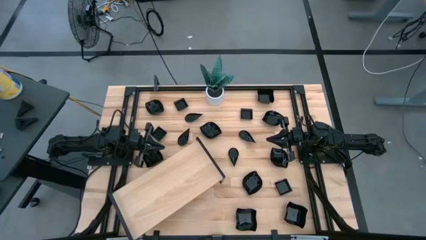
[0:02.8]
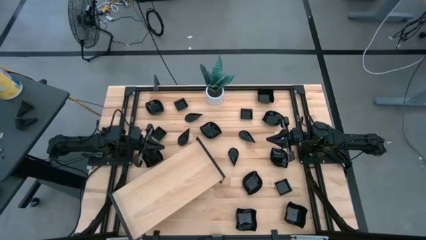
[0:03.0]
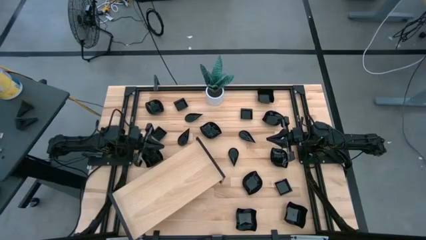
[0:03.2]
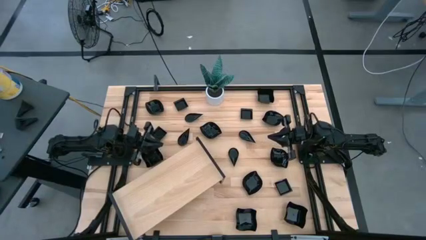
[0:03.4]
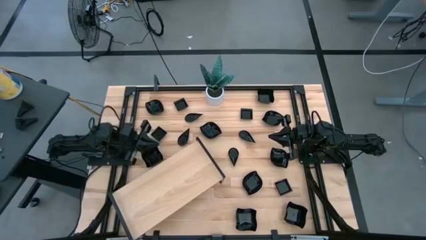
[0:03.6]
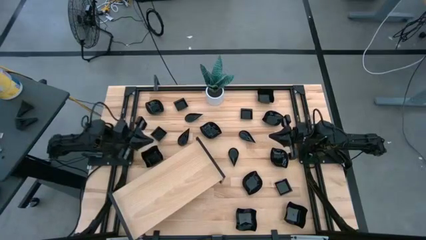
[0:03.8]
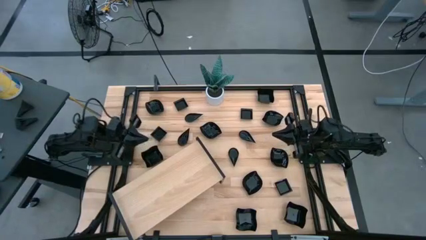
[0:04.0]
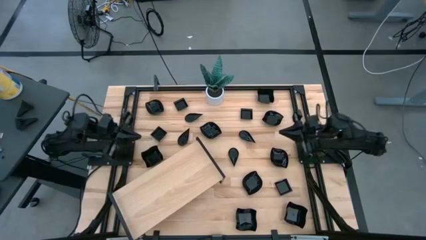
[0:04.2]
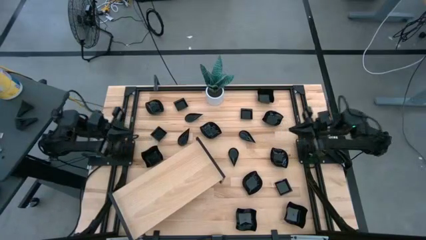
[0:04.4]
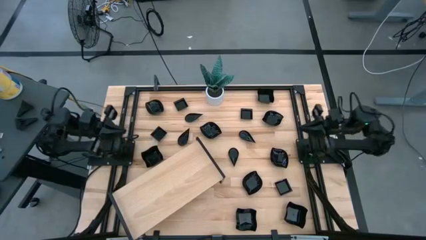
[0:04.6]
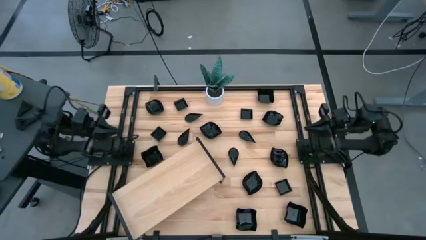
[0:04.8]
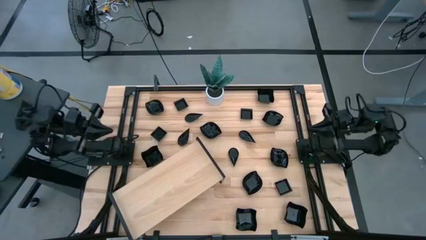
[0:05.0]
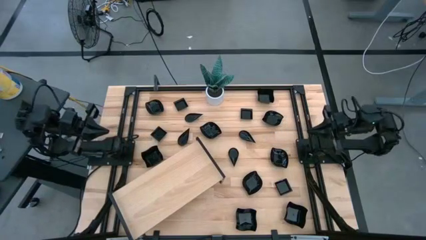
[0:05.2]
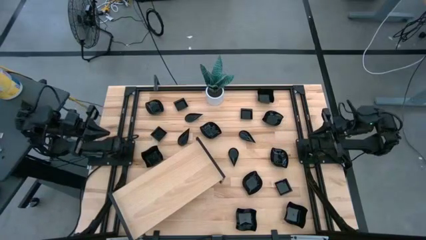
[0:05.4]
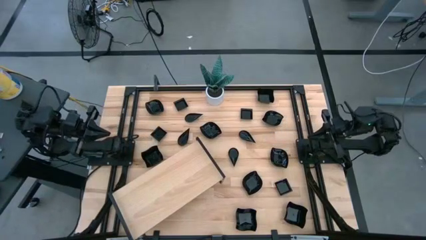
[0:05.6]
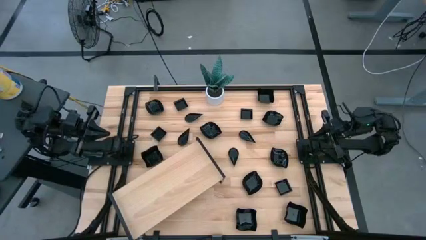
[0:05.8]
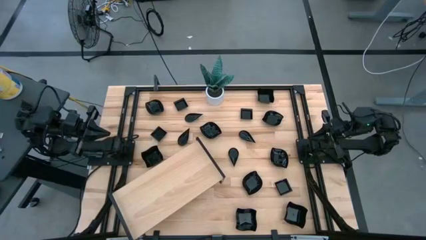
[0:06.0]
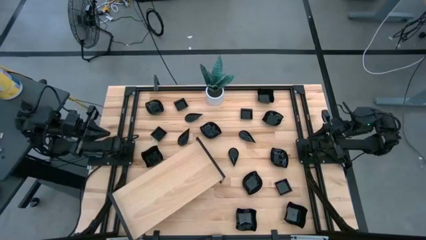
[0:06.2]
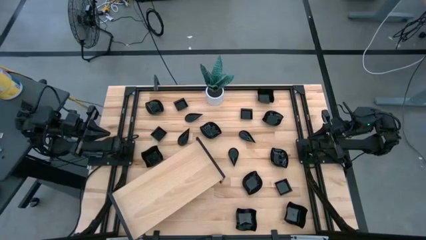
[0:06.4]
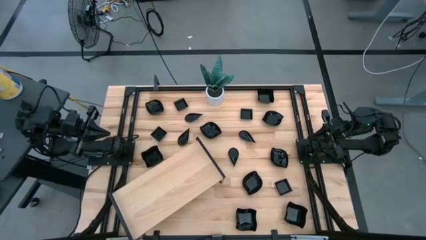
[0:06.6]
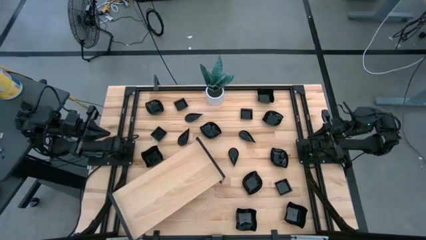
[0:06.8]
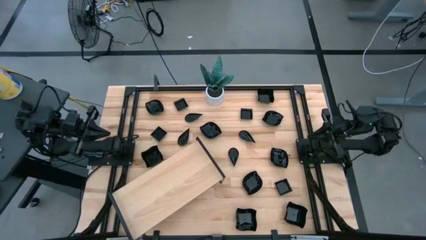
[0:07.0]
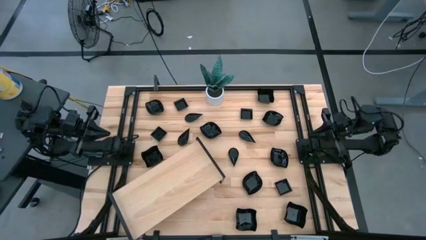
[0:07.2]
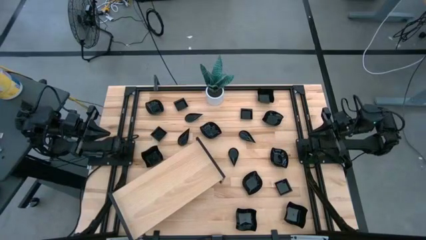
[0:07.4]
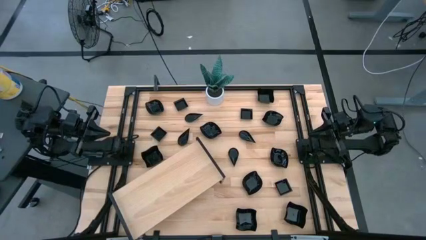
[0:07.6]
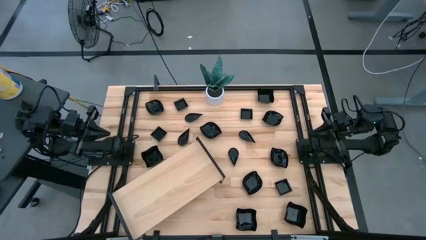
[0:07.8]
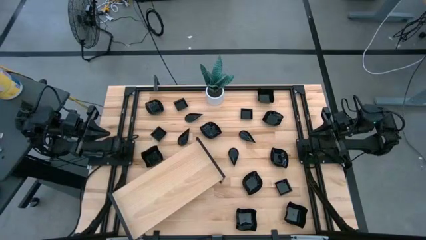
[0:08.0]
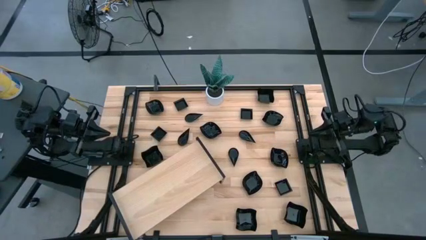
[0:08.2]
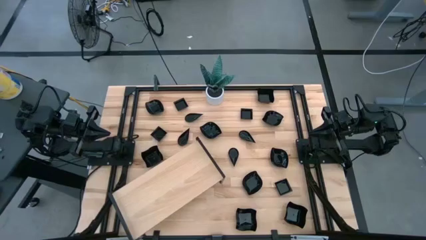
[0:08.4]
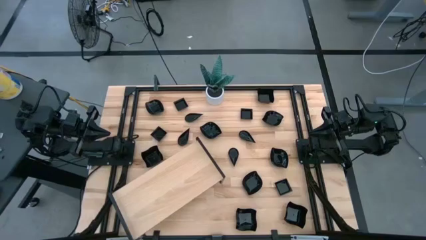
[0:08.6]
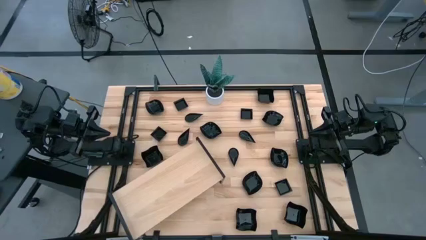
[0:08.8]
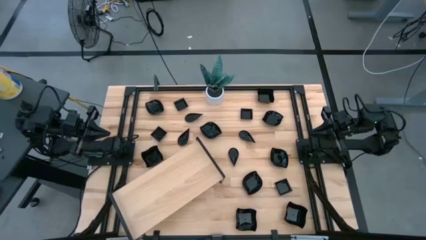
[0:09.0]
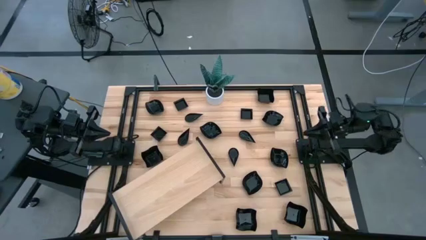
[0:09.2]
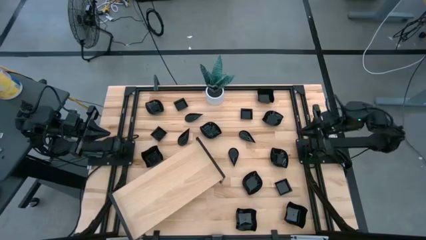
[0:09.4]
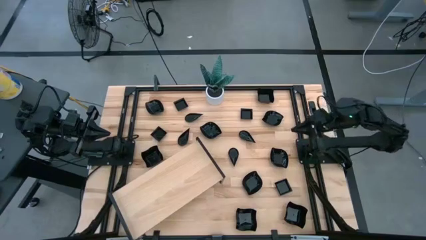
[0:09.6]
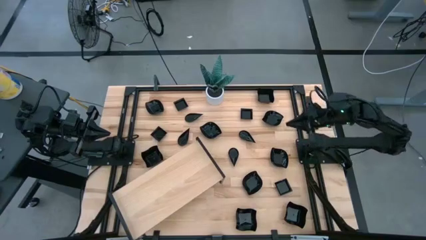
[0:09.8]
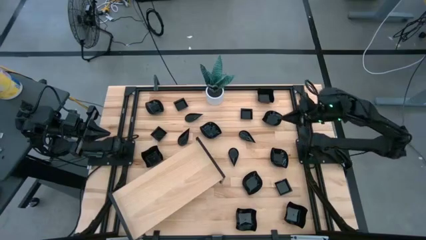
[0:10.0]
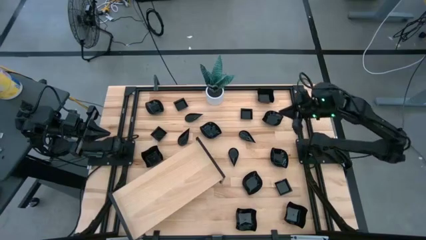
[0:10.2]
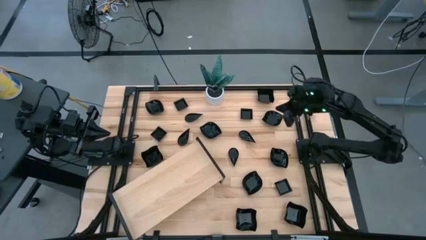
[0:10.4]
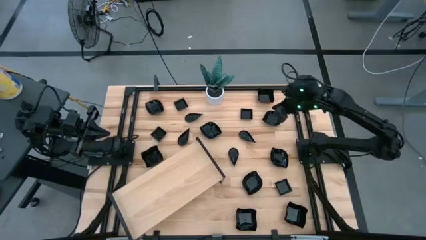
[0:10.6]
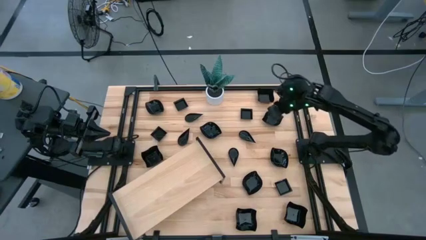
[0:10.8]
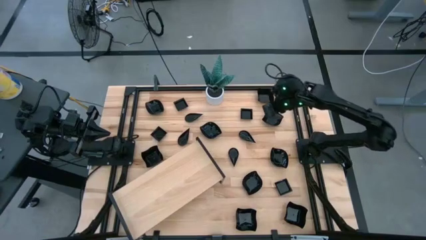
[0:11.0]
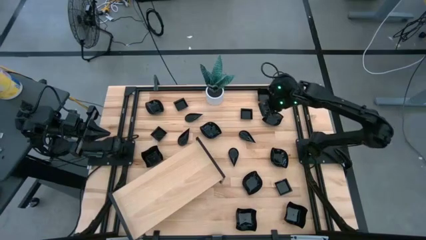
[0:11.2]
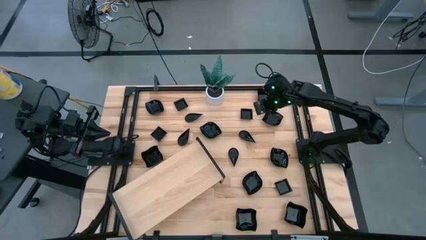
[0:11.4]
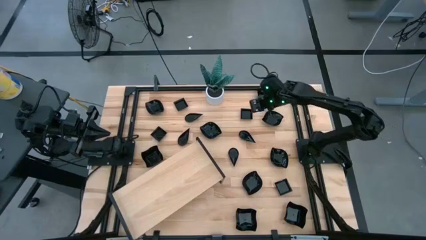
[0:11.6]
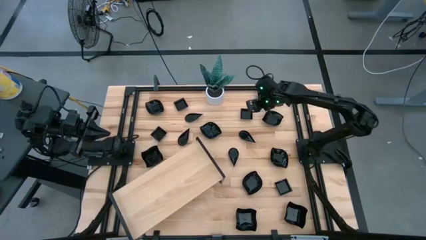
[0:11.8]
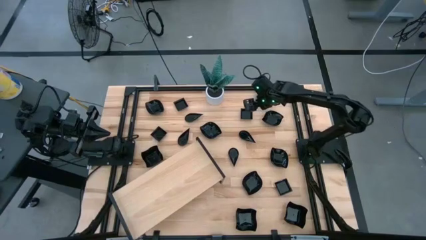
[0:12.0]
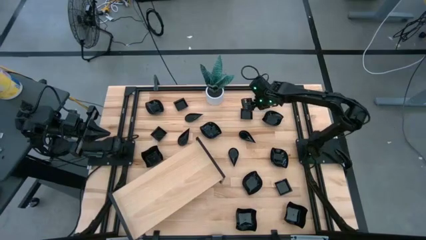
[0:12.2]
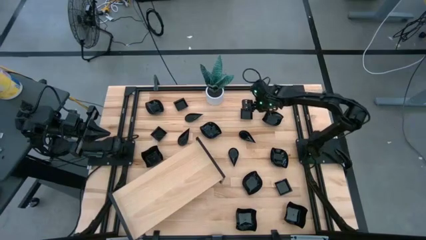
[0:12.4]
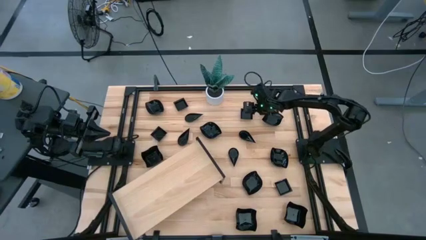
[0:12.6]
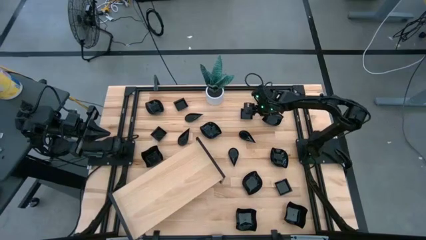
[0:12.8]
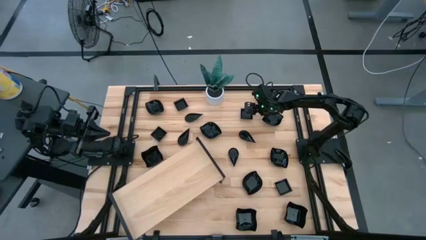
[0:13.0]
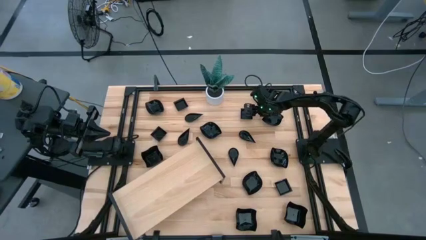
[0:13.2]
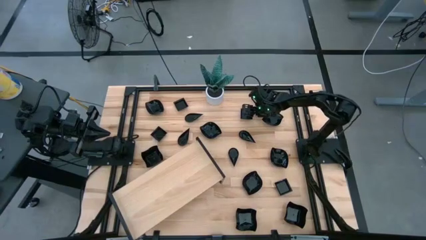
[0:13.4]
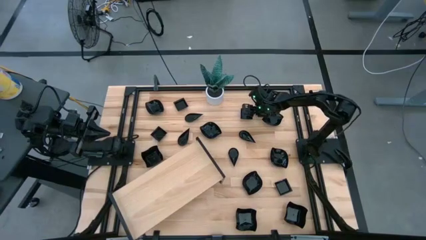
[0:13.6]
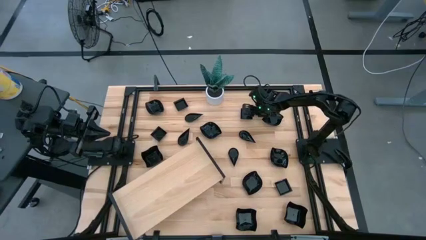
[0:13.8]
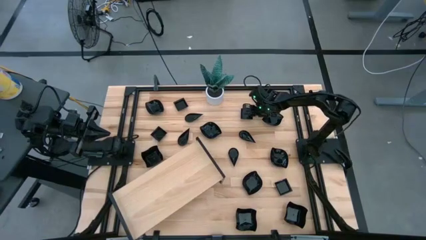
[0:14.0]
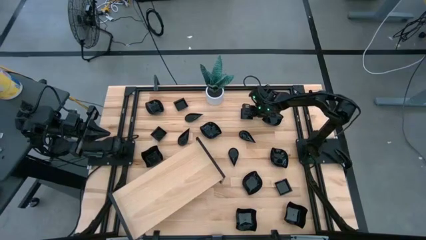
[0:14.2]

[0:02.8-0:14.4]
Task: Pick & Place Mini shaped plates
Put the black square plate on the shelf
